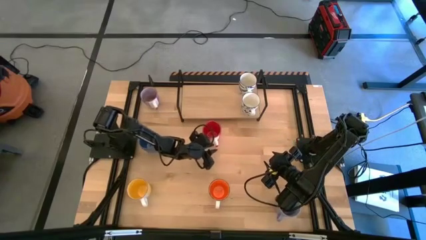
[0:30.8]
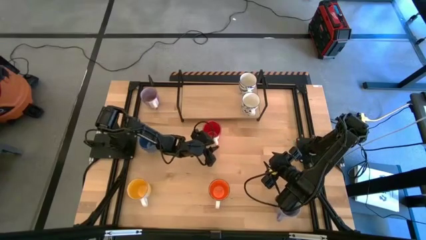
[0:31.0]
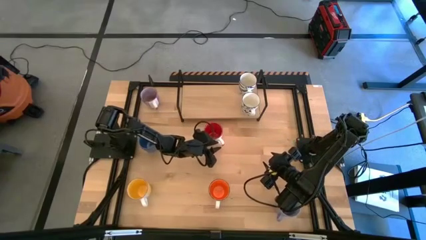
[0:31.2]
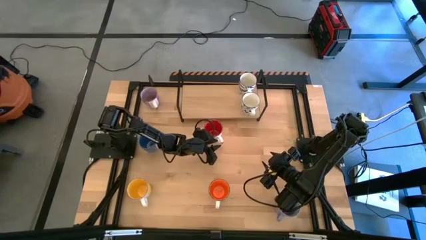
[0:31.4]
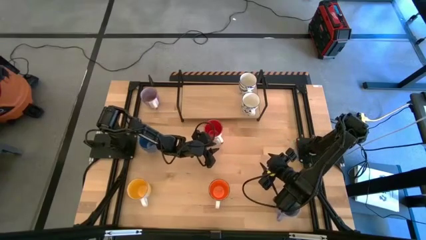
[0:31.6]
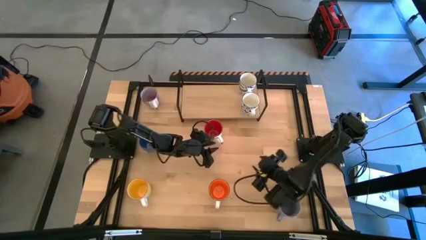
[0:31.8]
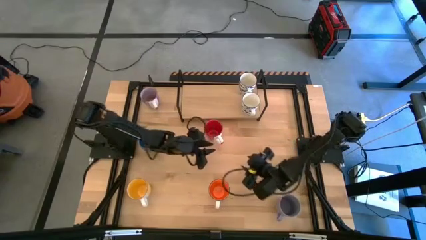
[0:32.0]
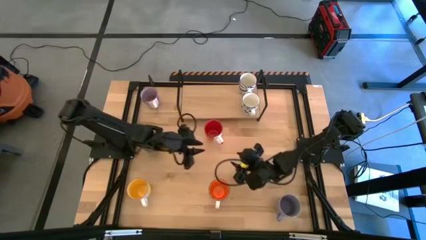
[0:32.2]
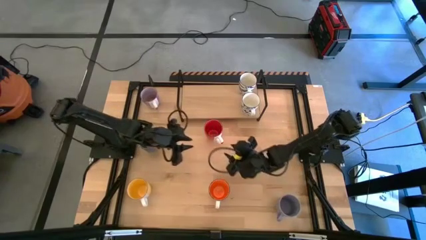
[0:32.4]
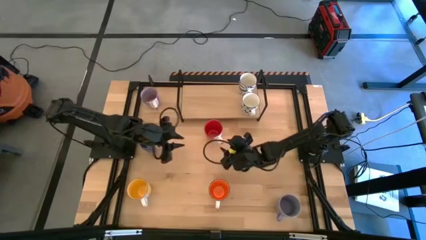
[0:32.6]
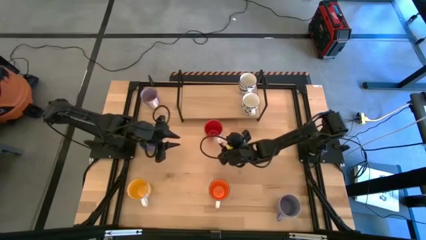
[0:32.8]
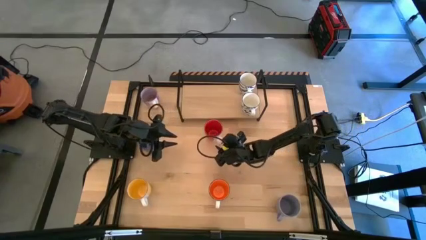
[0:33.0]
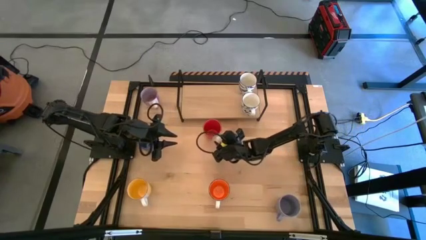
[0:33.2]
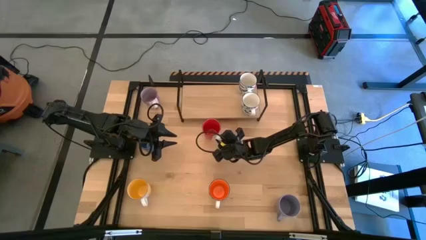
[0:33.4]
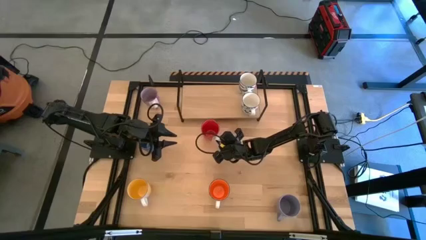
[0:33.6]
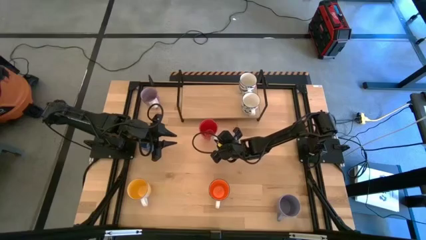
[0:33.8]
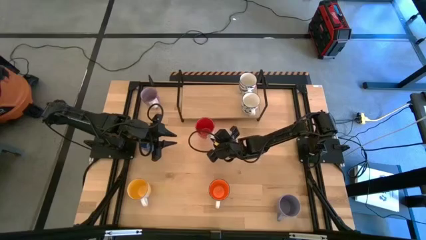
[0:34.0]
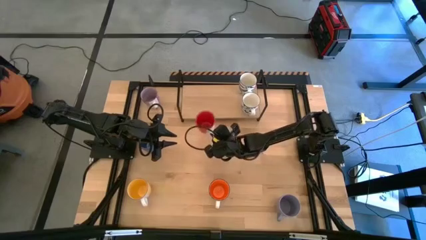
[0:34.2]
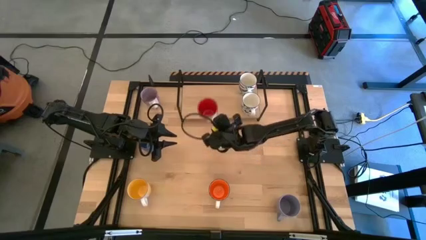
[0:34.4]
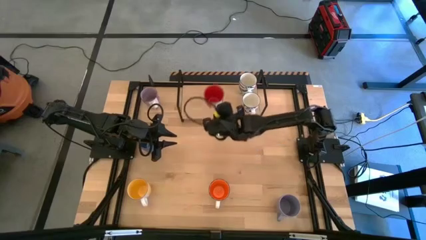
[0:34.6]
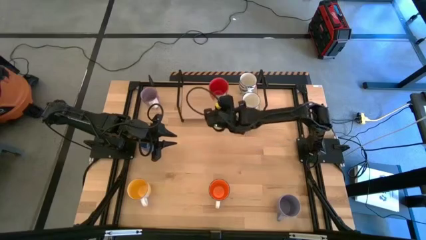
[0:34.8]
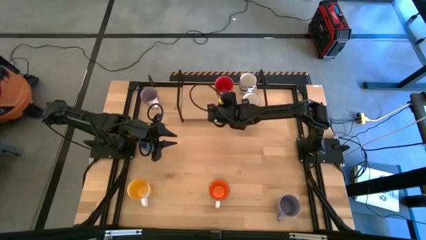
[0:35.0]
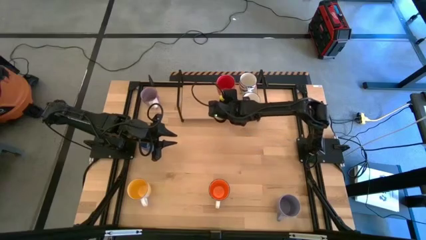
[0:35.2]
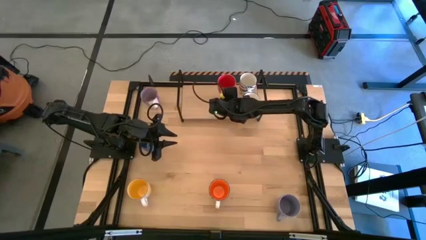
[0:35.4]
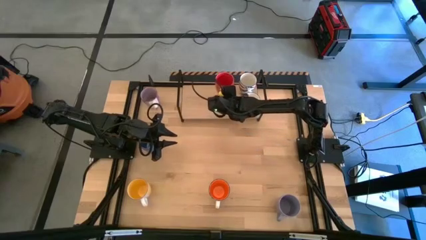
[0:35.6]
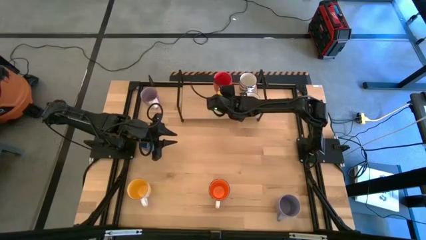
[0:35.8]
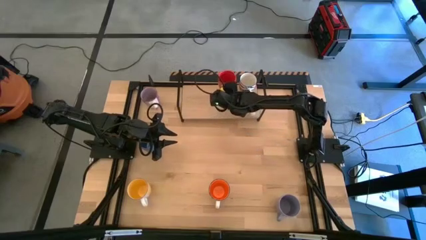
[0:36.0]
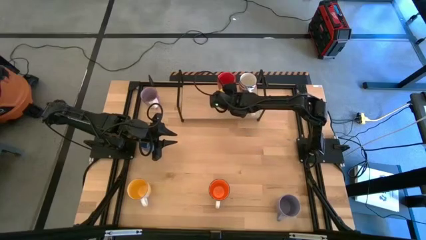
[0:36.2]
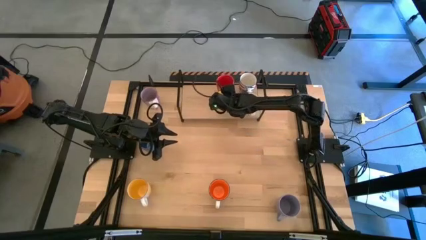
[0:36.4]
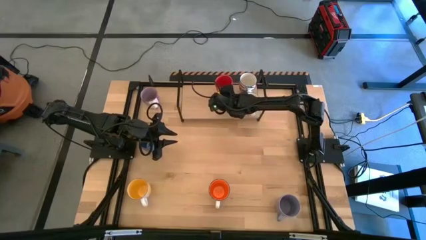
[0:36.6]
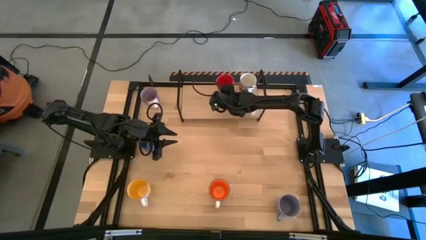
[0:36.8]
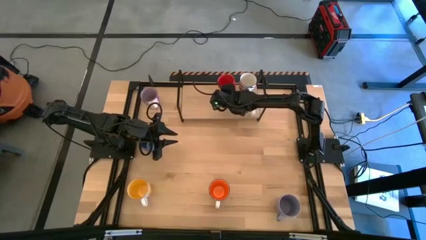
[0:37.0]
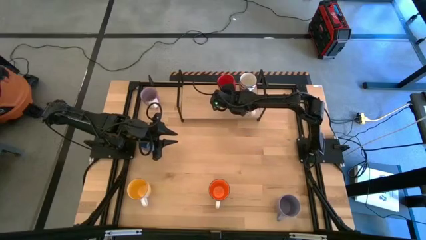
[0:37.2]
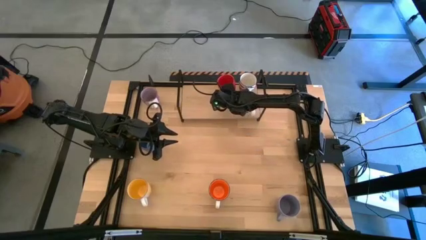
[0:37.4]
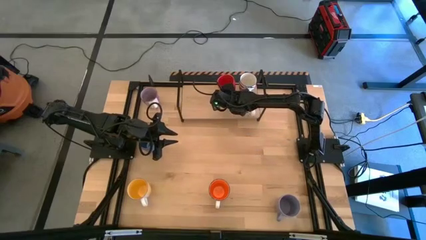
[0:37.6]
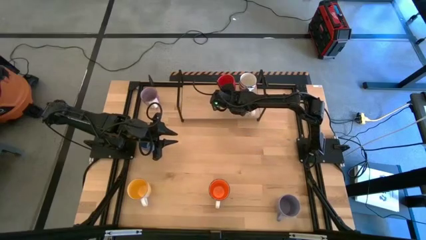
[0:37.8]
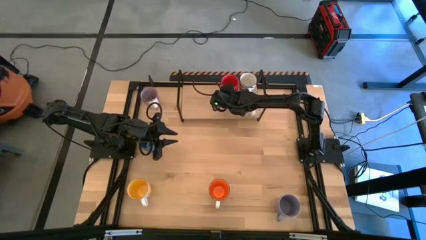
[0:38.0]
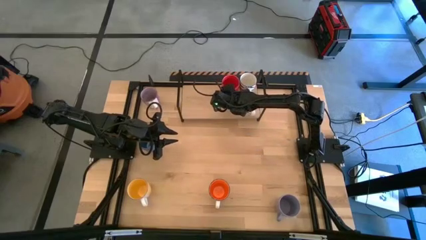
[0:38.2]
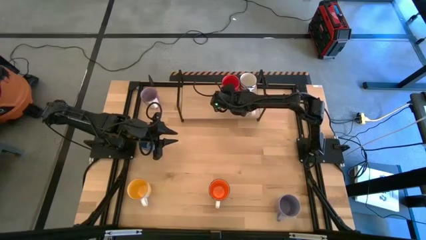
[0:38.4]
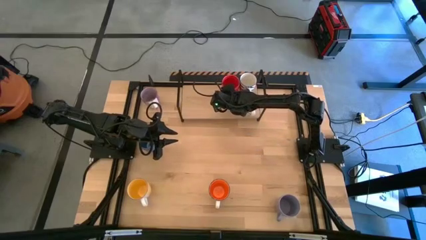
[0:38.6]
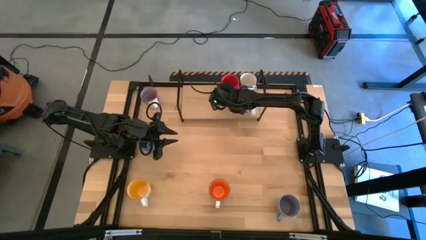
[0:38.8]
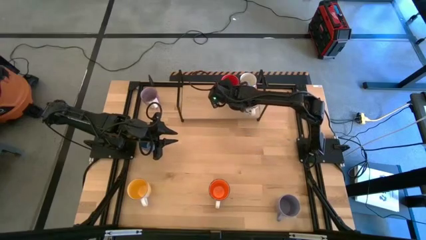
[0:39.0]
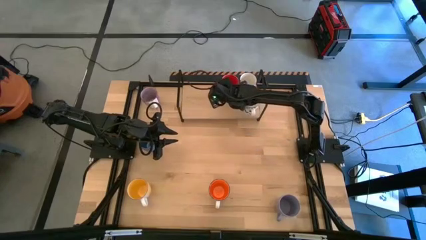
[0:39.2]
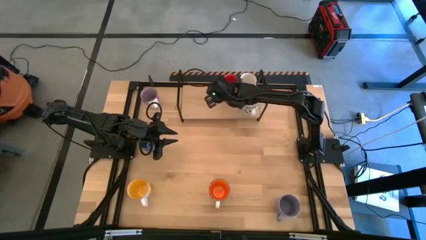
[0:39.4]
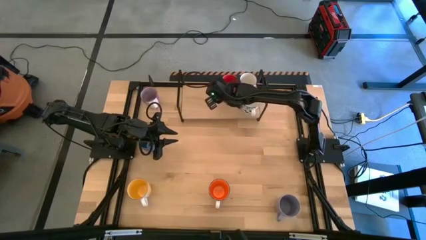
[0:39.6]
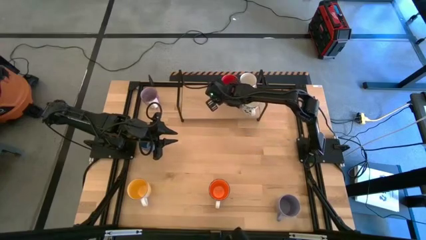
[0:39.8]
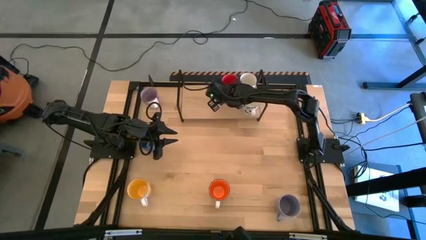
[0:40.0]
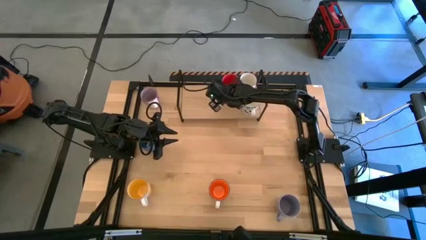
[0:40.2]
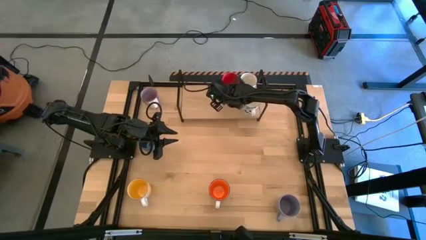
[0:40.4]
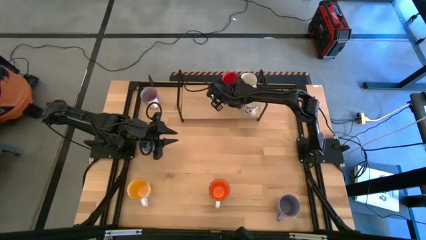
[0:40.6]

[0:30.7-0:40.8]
Task: Place coffee mugs
Put the red mug on the shelf

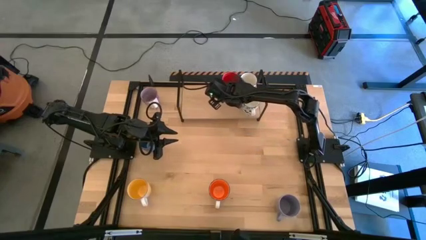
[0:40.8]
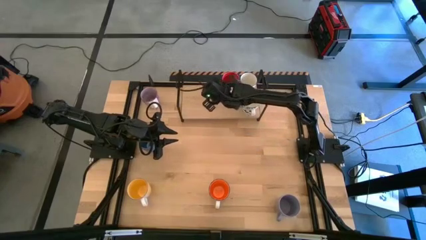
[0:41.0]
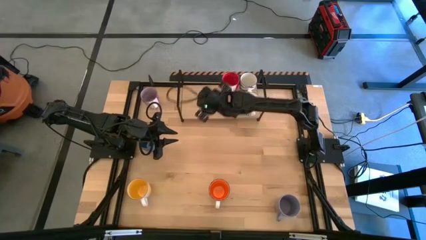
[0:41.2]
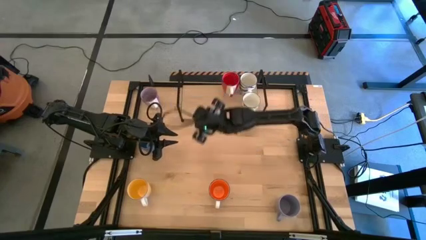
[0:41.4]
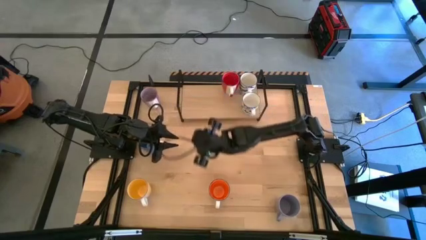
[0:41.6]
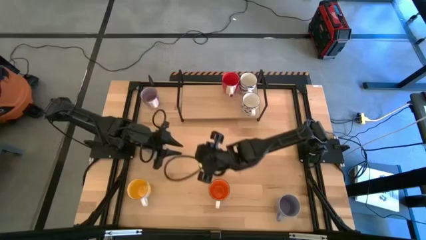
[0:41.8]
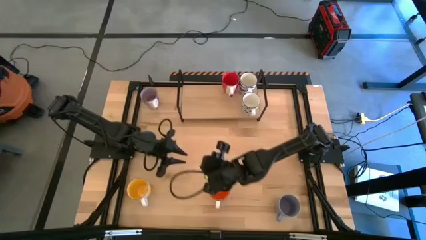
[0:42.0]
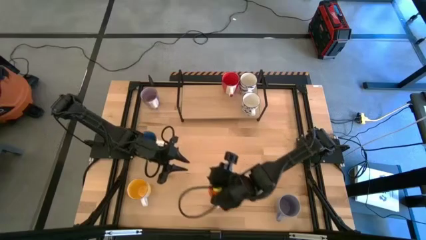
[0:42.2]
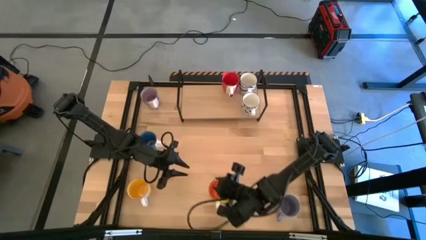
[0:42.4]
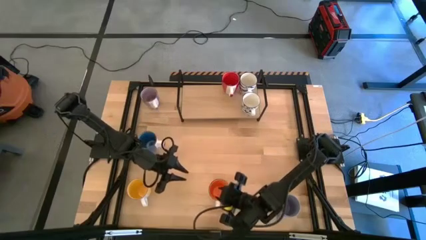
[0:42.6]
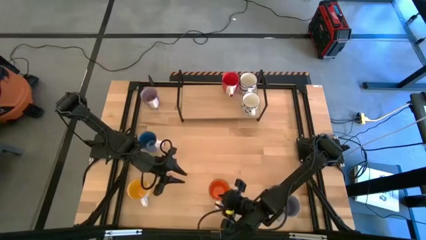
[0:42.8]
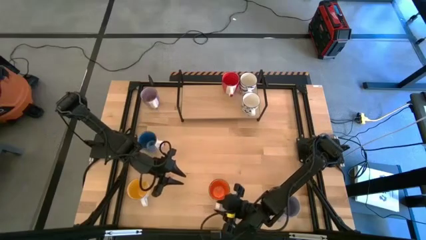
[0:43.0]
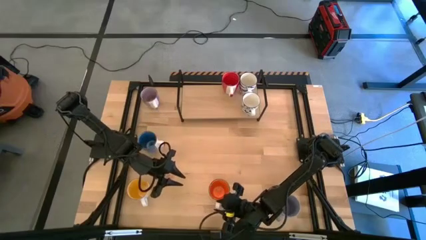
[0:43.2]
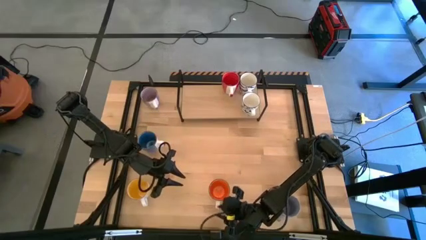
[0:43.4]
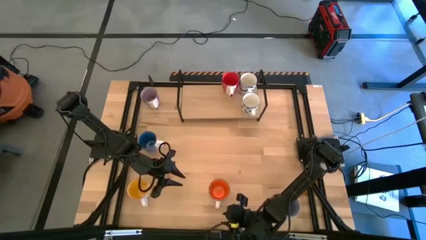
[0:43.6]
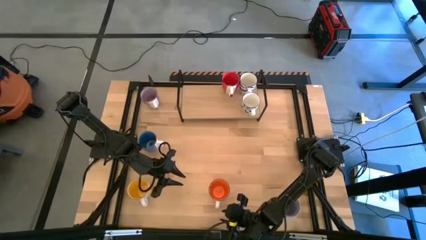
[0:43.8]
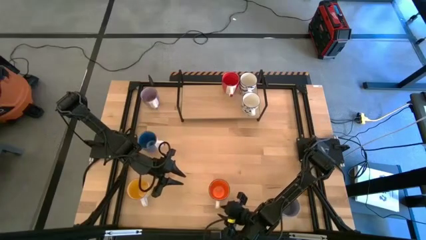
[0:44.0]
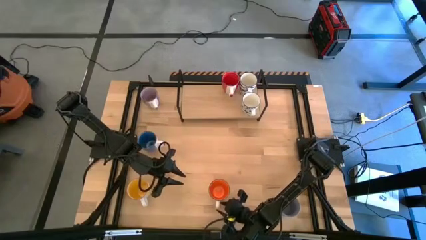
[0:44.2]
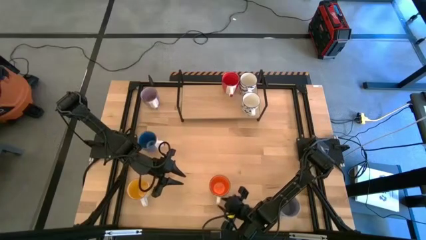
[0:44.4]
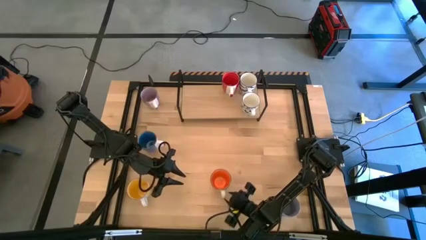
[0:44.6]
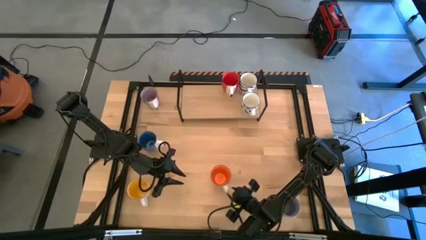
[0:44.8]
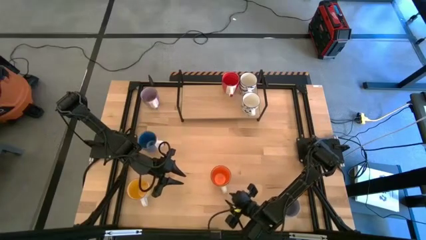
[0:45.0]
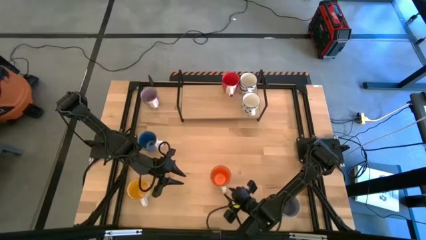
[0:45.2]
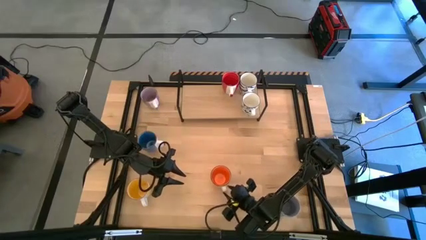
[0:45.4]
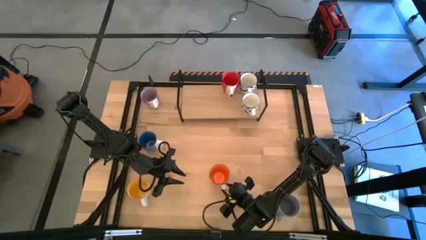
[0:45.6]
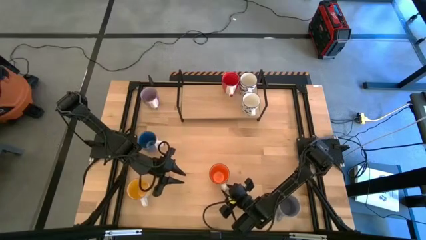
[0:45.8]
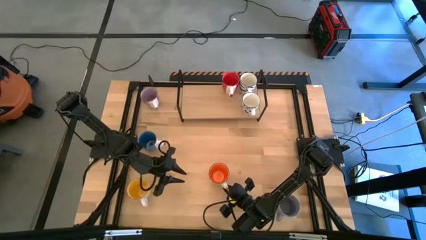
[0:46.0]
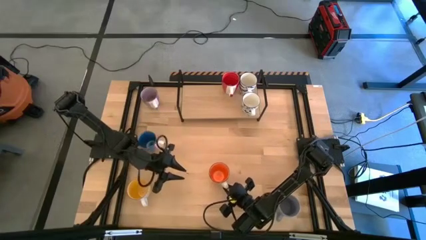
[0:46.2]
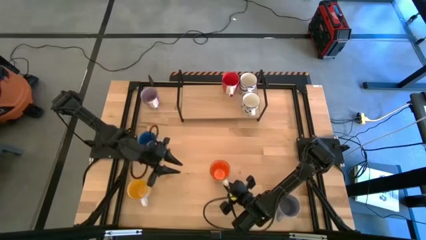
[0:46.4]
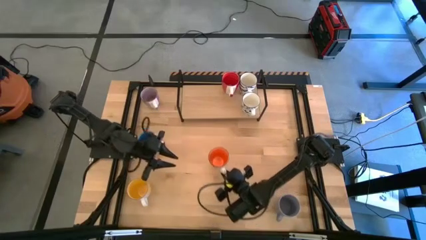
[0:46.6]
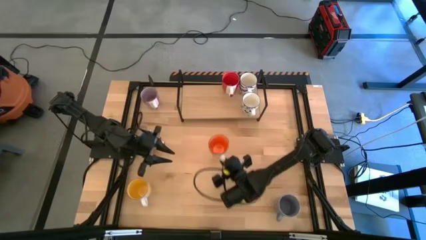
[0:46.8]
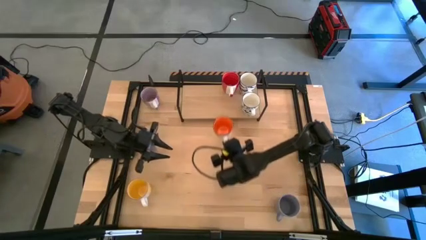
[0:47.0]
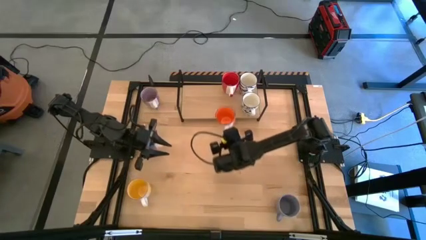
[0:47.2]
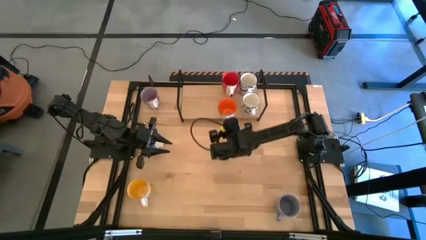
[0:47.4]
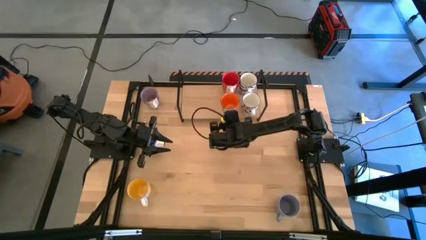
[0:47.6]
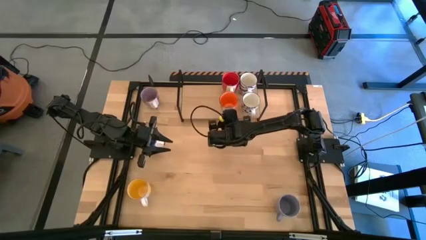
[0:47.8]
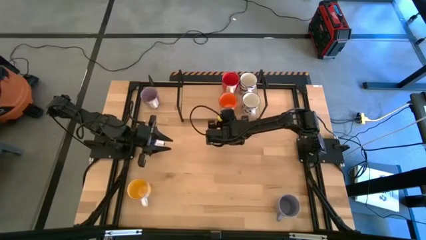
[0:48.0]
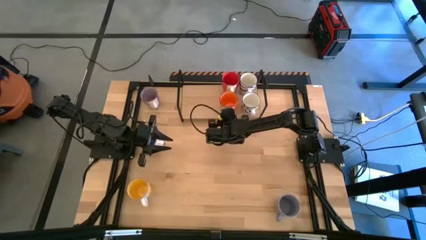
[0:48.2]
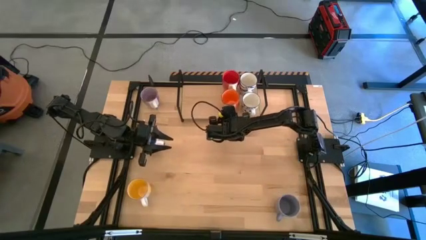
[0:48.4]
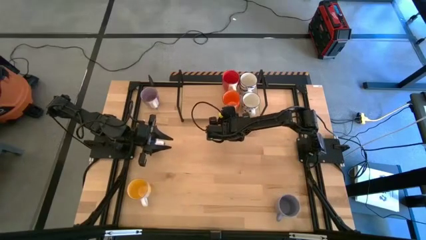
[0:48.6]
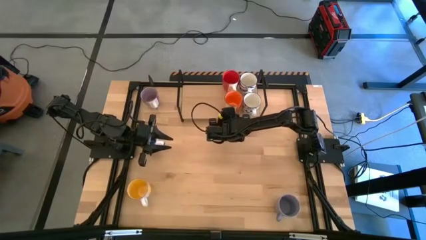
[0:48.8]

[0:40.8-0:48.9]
Put the orange mug on the shelf
